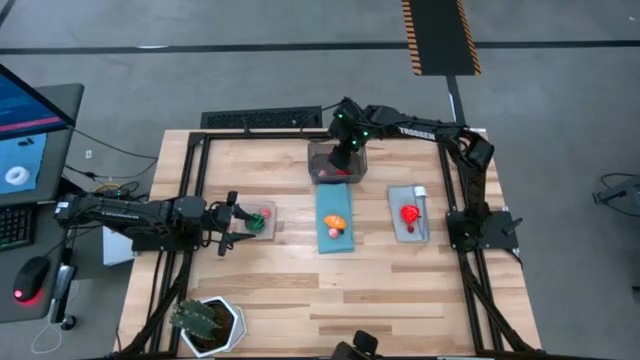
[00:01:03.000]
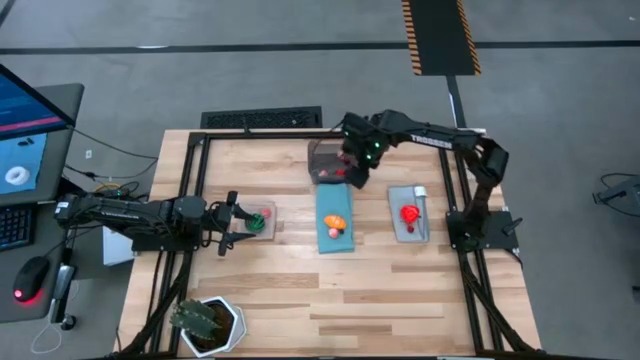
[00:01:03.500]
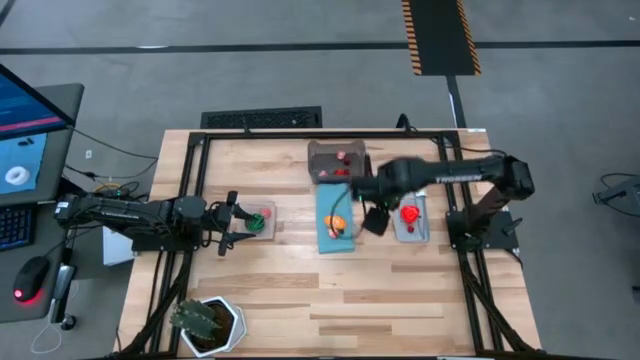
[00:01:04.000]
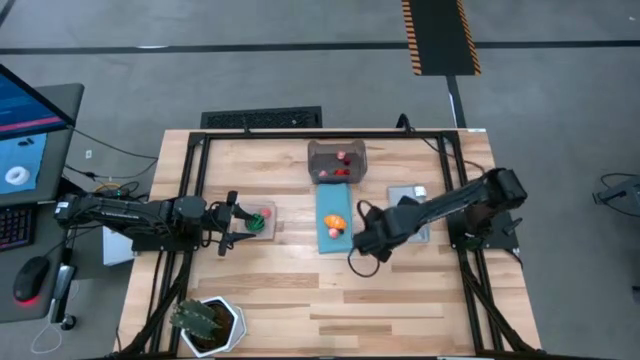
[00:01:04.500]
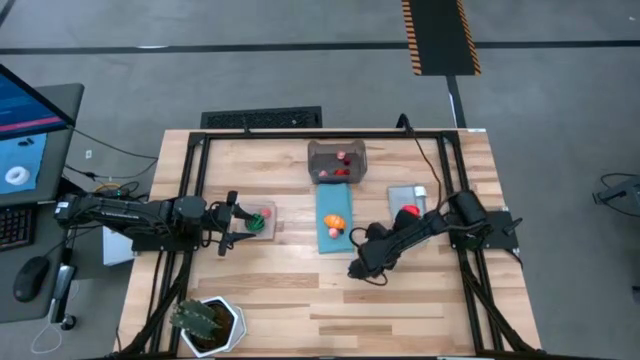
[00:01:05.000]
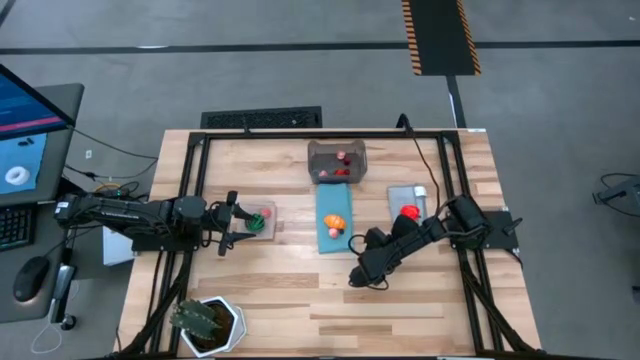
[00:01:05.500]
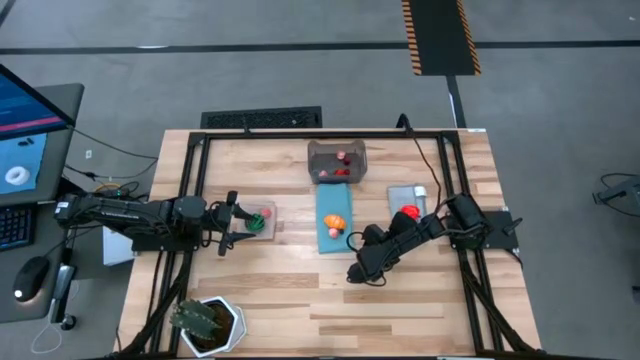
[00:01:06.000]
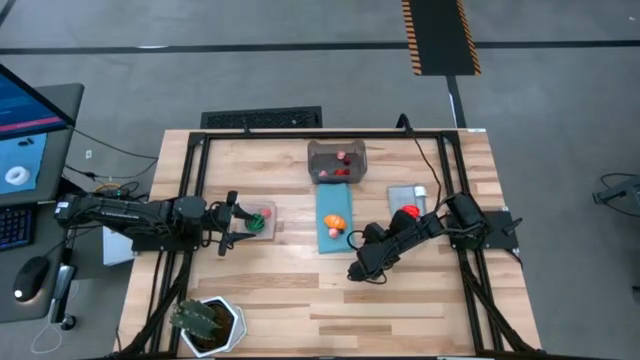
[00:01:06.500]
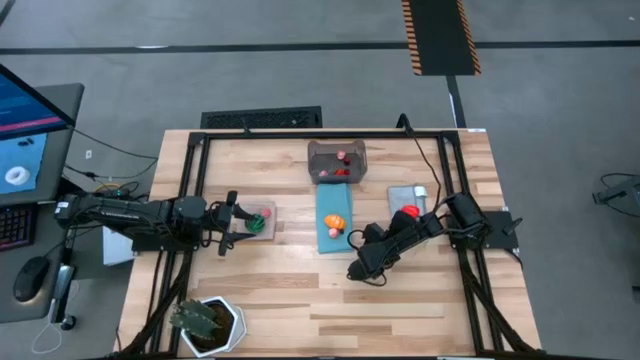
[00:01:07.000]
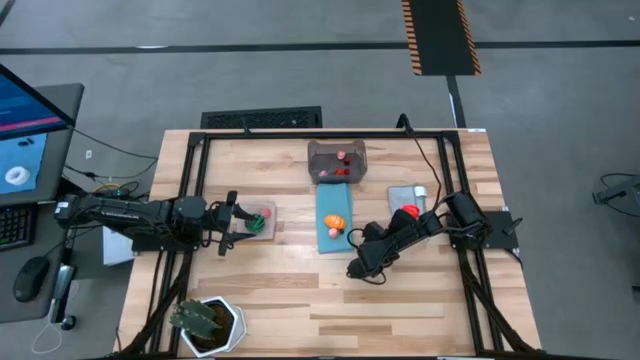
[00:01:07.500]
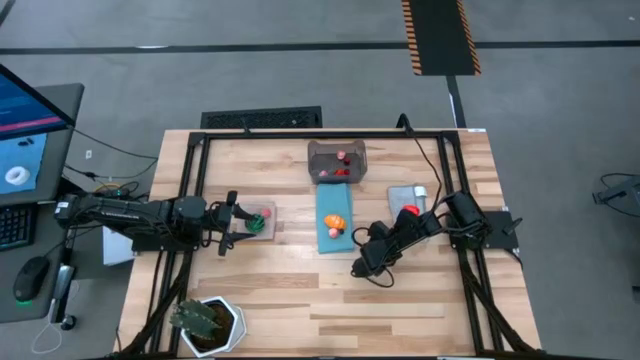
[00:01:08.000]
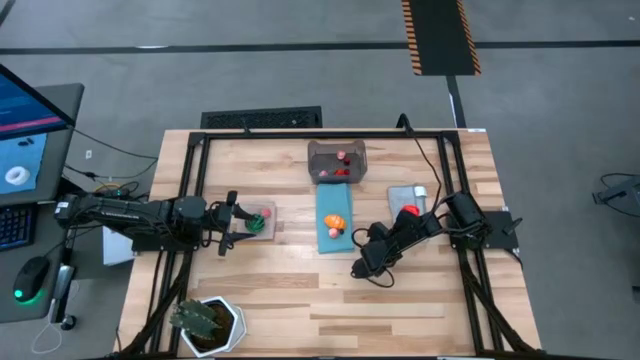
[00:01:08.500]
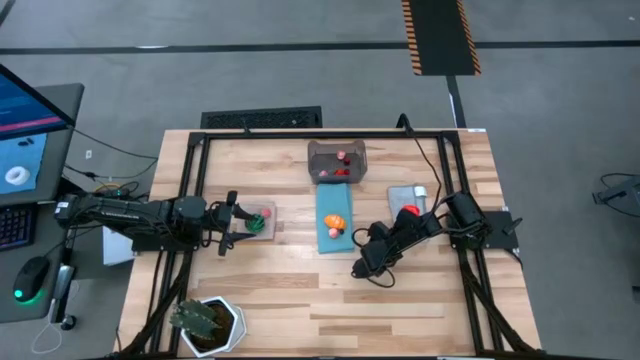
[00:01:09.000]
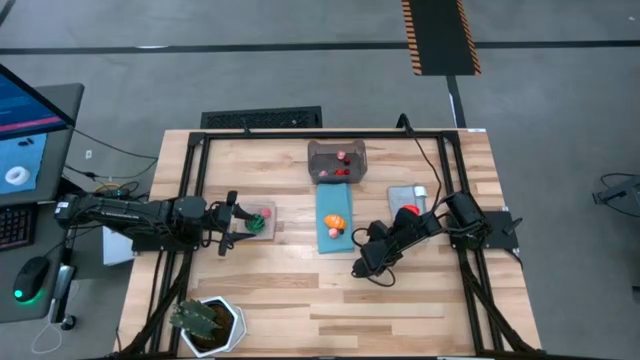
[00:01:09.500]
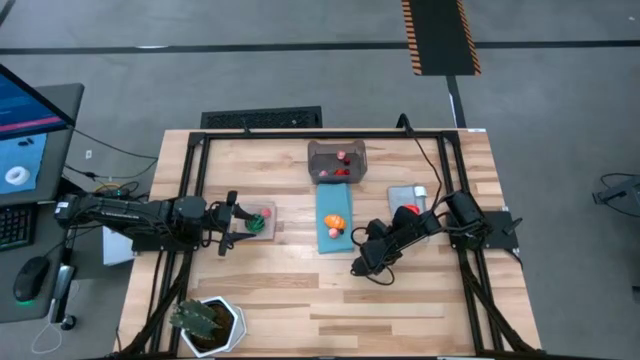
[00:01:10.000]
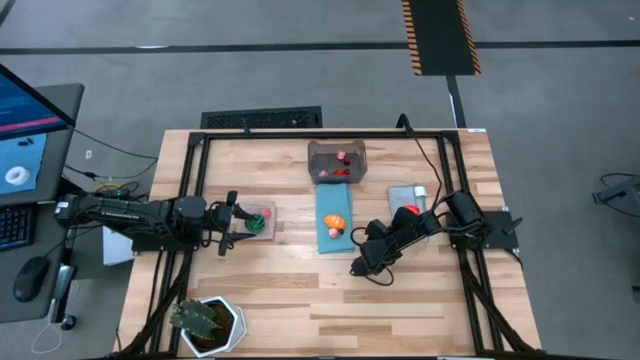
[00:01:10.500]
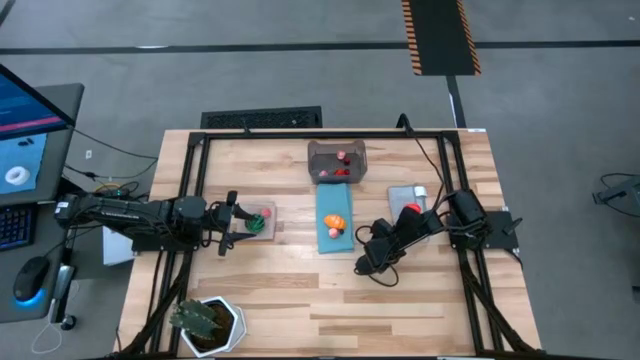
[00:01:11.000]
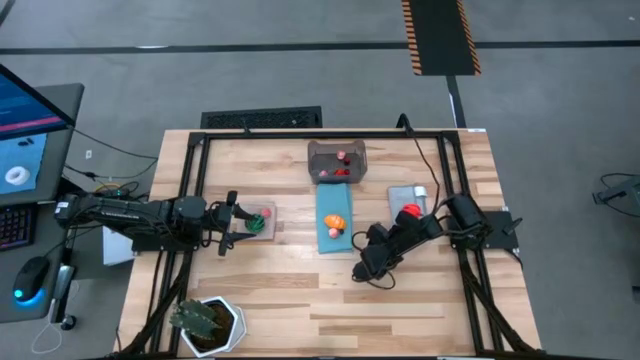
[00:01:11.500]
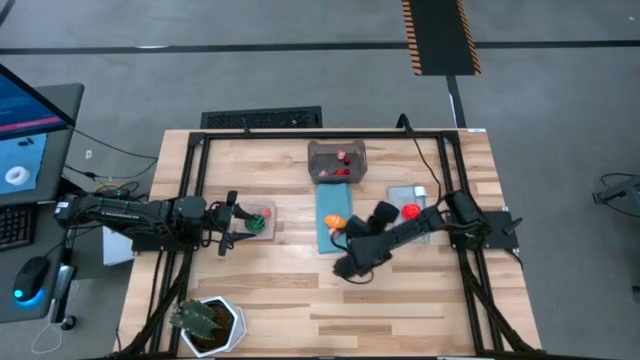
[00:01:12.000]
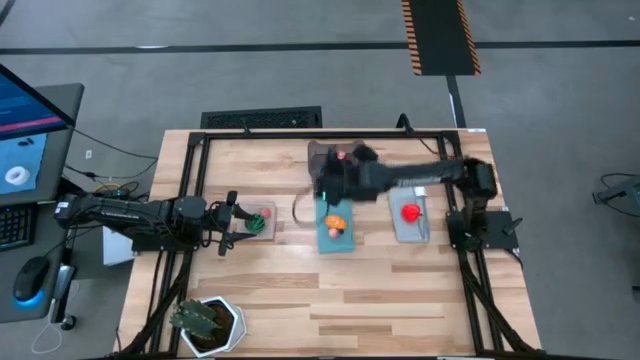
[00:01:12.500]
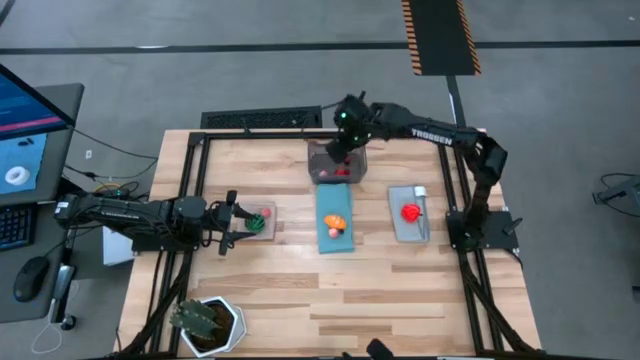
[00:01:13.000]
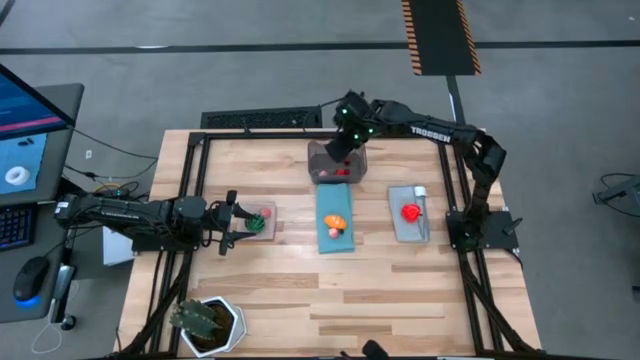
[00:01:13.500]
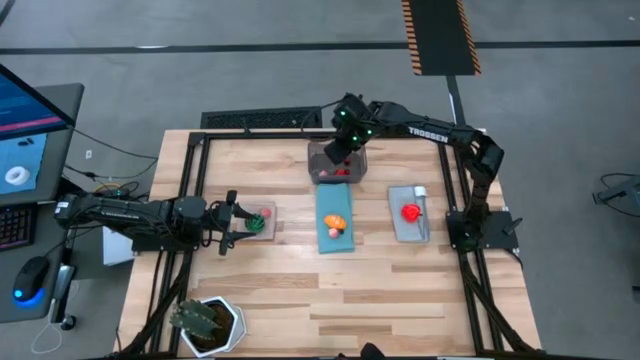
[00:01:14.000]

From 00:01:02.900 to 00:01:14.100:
Task: Pick and placing Produce into tupperware
Put the red cherry into the gray bin

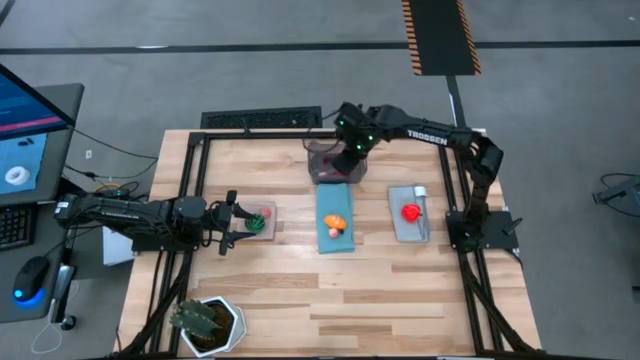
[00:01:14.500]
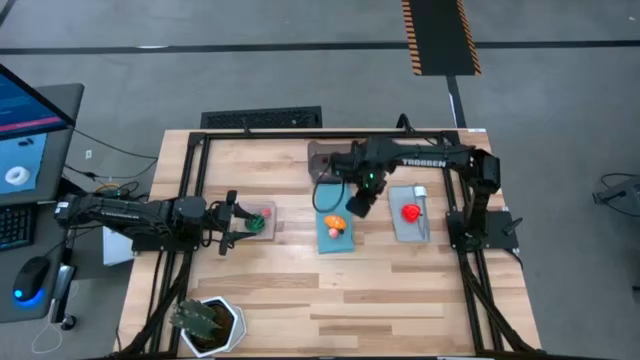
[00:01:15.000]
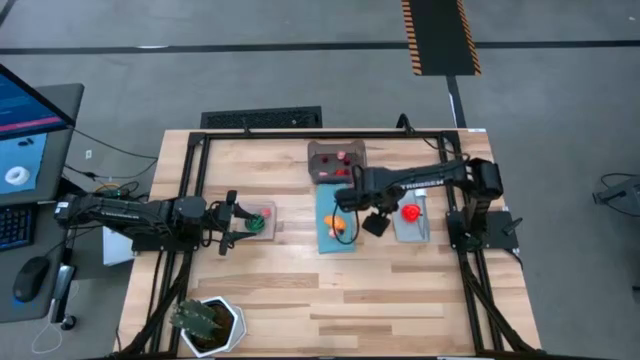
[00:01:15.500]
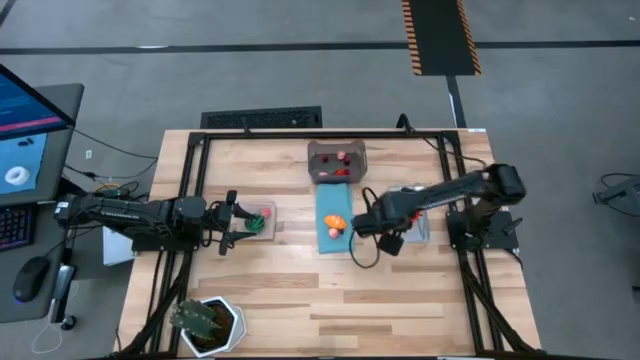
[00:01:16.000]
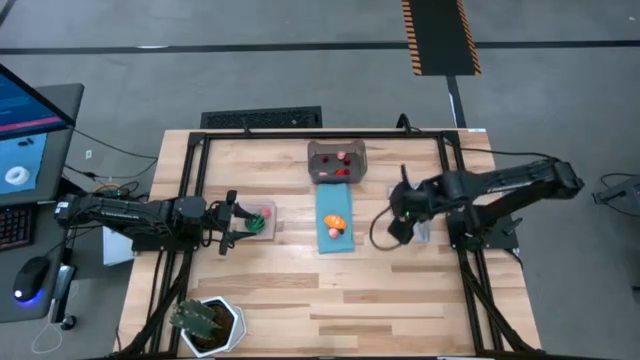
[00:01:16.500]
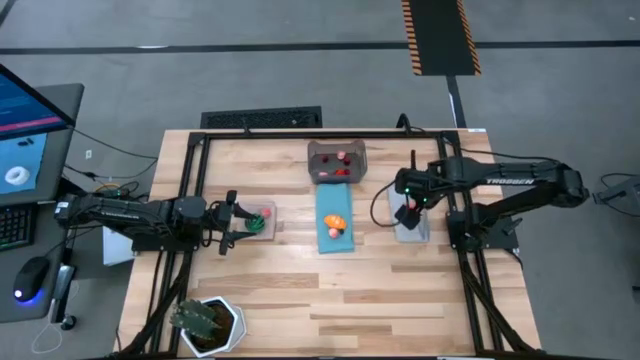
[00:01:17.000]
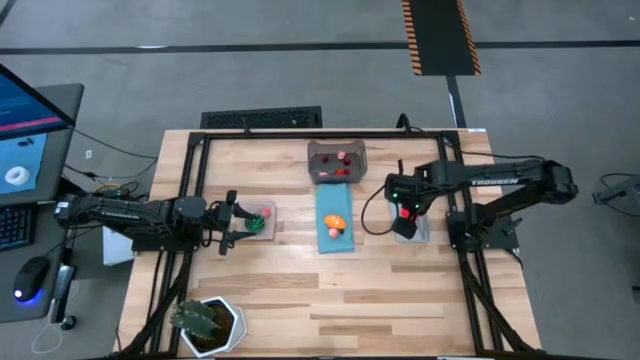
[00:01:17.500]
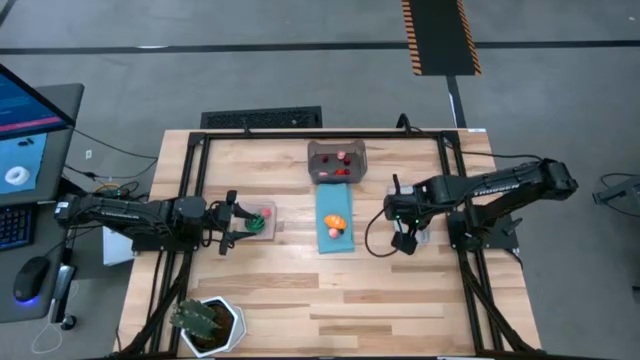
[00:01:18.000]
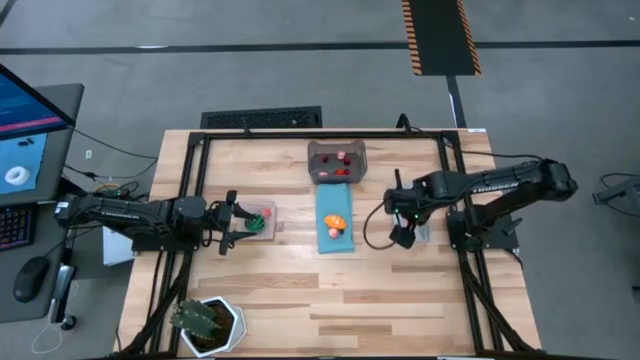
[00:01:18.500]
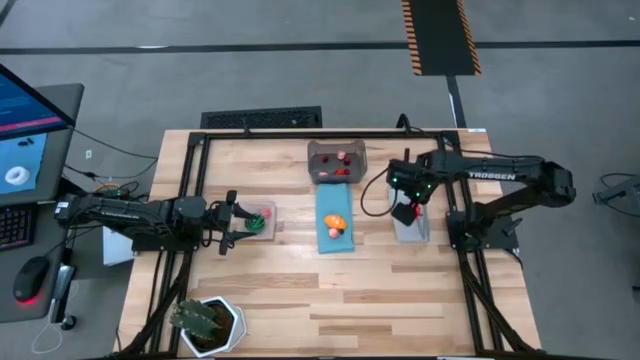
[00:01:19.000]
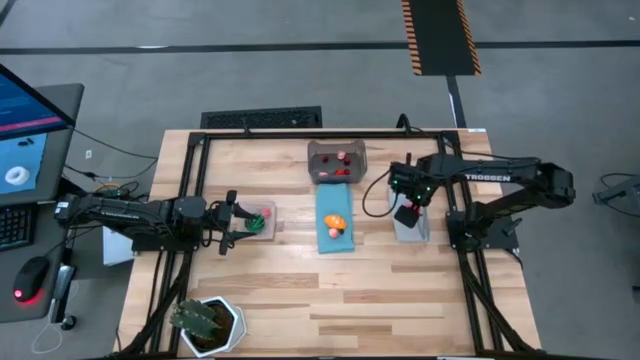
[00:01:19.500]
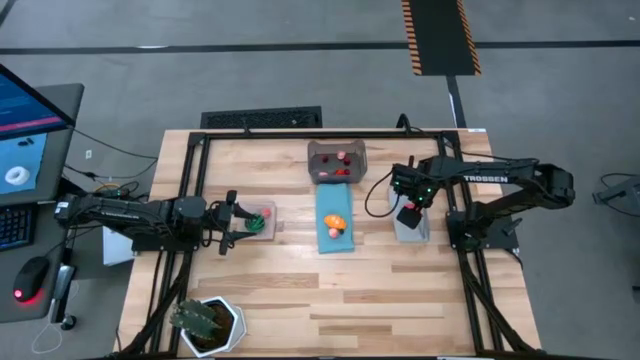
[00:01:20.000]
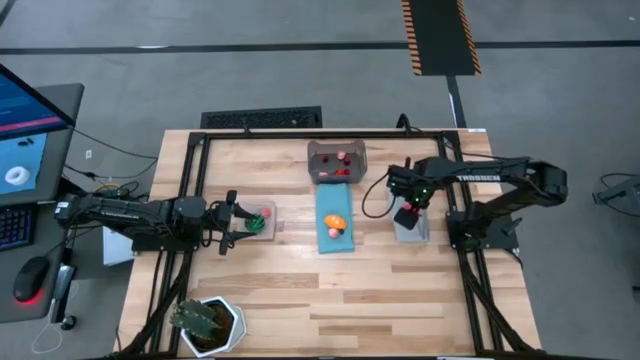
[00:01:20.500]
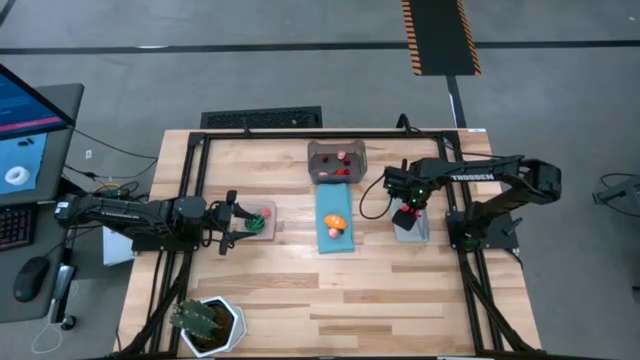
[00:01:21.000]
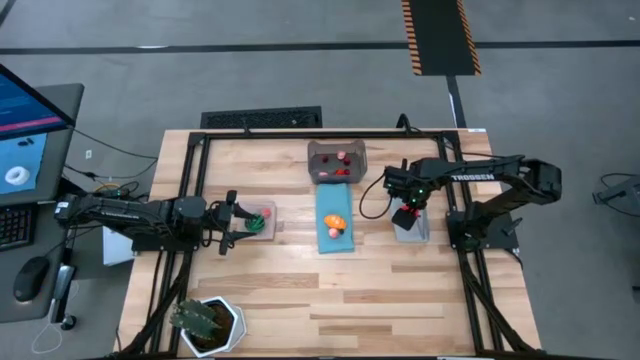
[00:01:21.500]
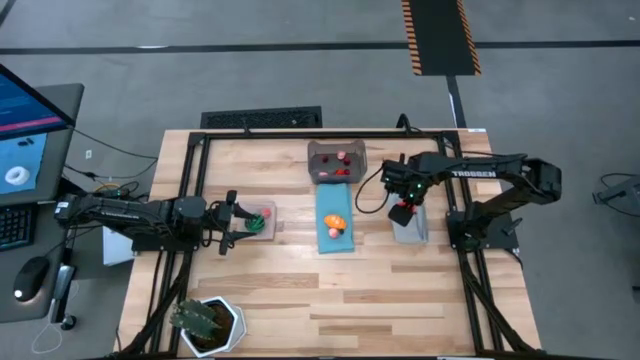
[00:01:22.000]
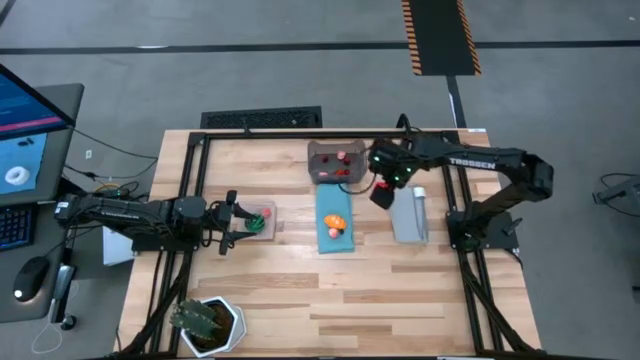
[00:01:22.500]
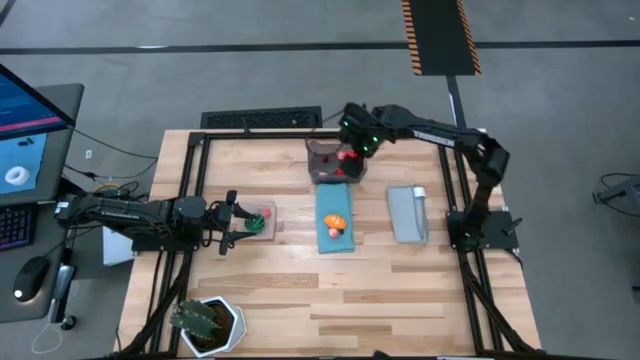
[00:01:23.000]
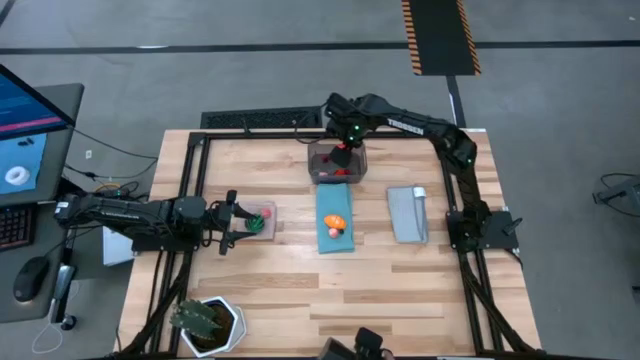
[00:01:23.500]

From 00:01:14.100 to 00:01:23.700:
Put the red apple into the gray bin
